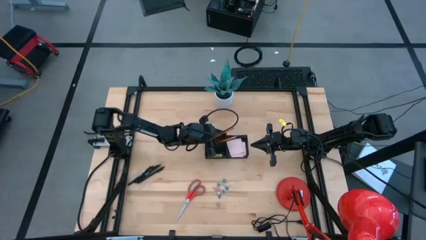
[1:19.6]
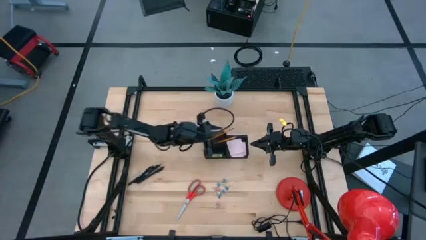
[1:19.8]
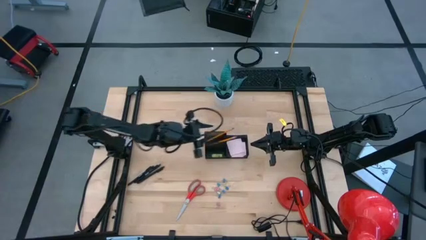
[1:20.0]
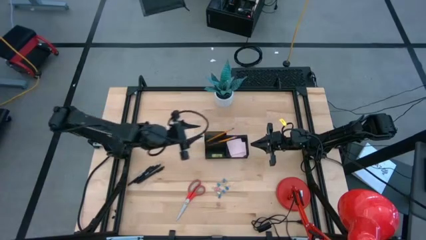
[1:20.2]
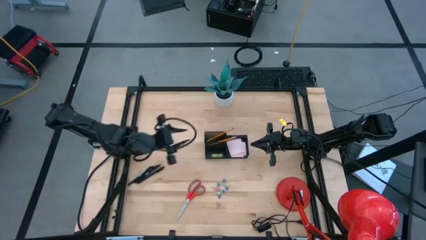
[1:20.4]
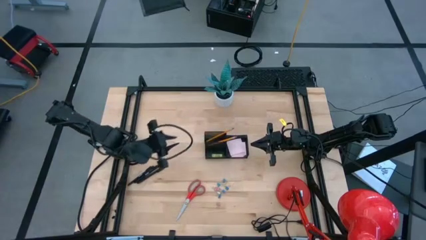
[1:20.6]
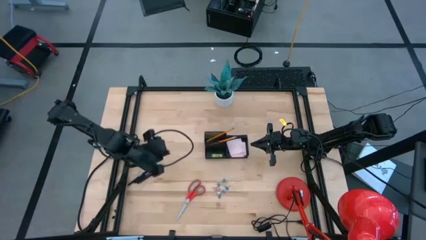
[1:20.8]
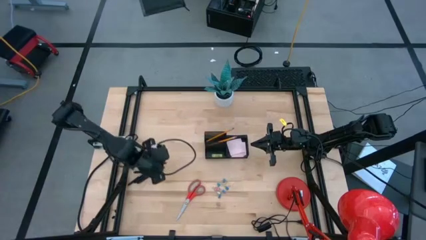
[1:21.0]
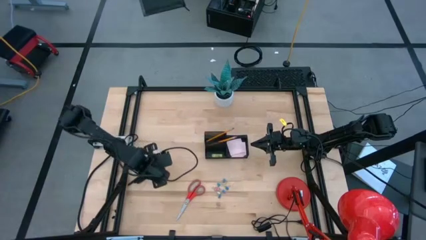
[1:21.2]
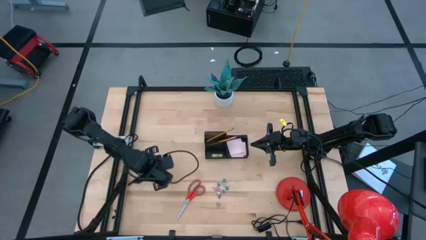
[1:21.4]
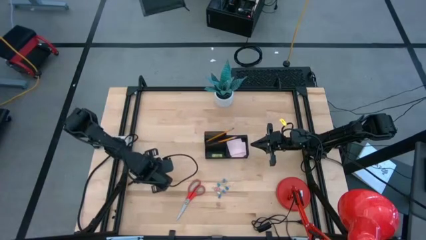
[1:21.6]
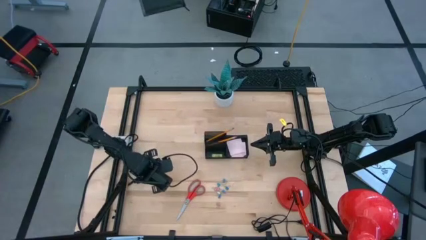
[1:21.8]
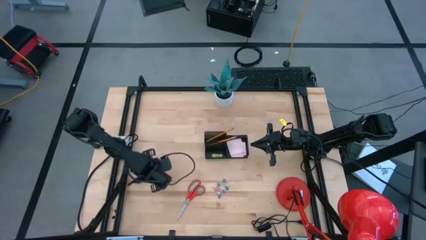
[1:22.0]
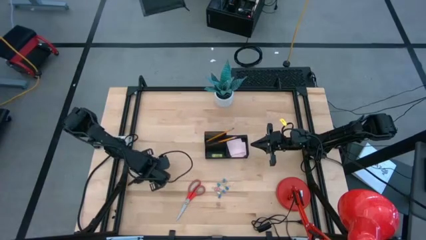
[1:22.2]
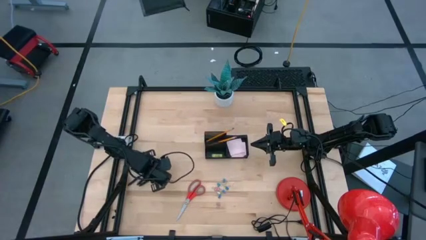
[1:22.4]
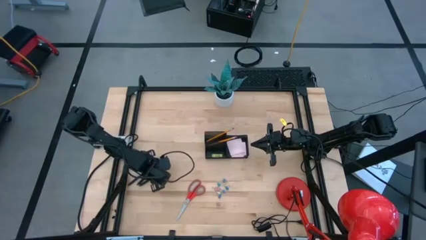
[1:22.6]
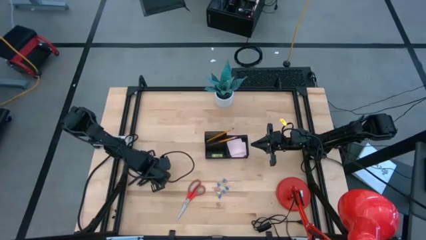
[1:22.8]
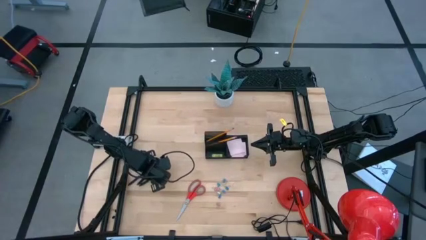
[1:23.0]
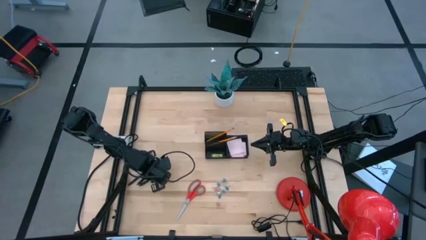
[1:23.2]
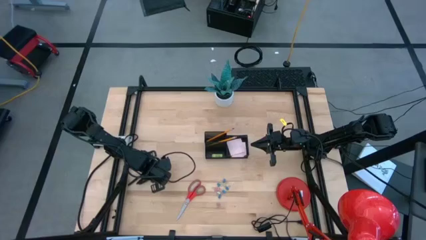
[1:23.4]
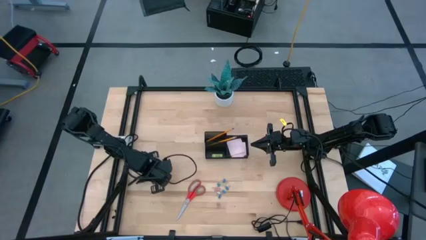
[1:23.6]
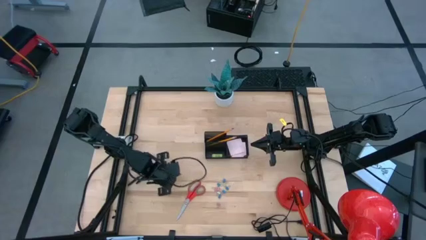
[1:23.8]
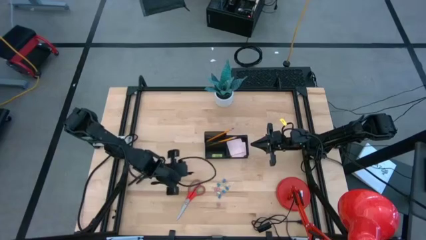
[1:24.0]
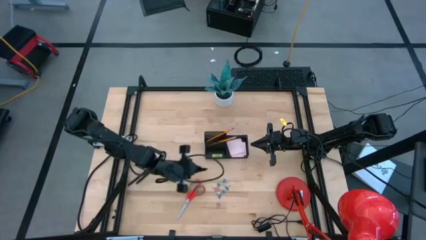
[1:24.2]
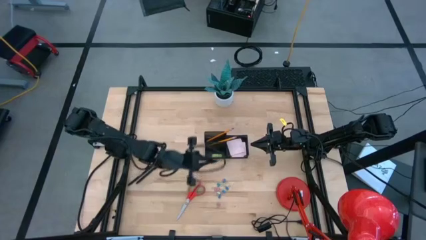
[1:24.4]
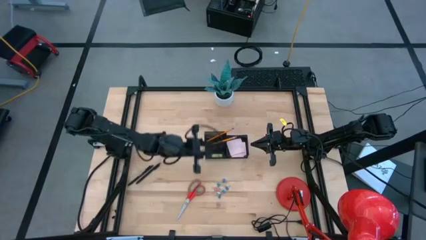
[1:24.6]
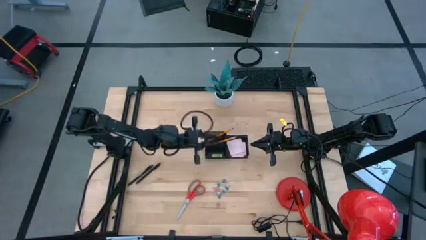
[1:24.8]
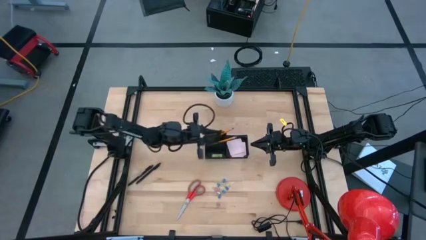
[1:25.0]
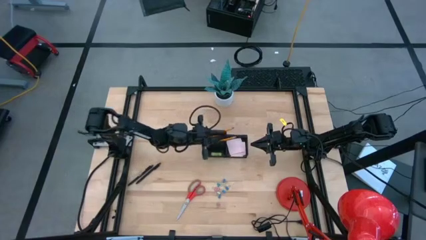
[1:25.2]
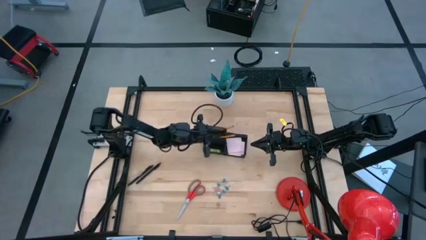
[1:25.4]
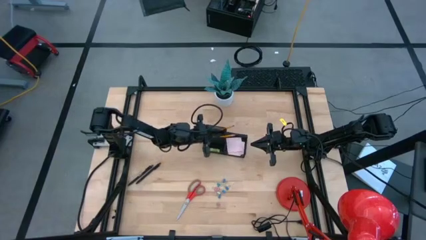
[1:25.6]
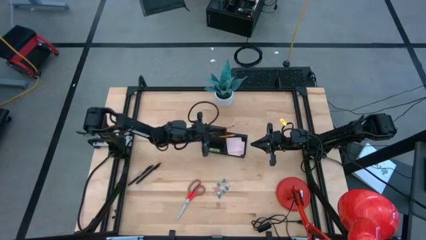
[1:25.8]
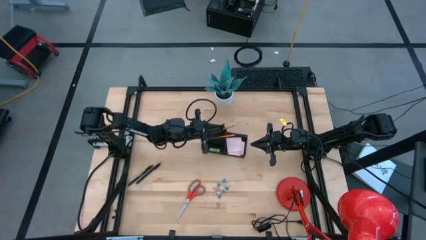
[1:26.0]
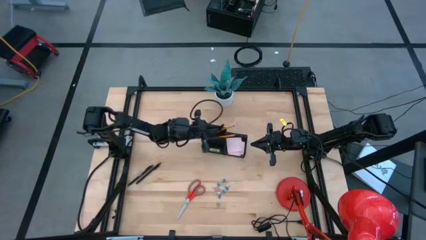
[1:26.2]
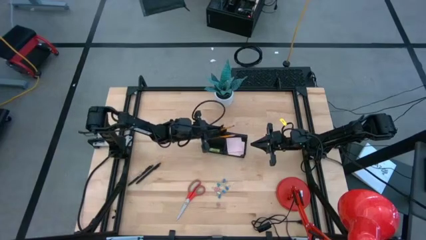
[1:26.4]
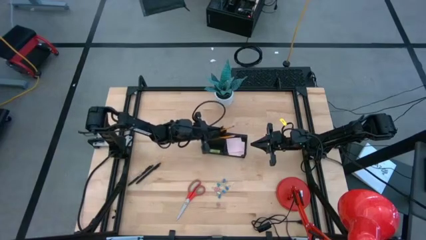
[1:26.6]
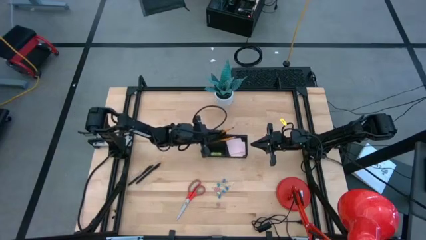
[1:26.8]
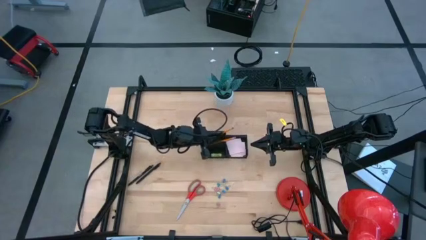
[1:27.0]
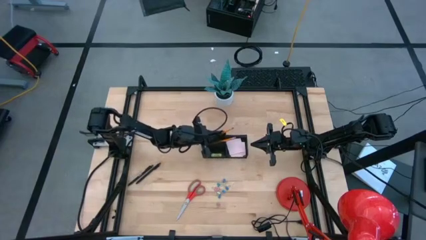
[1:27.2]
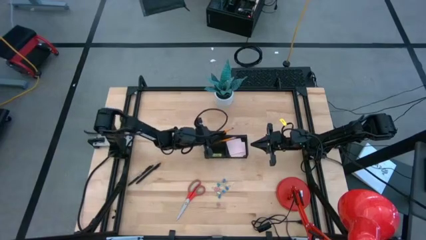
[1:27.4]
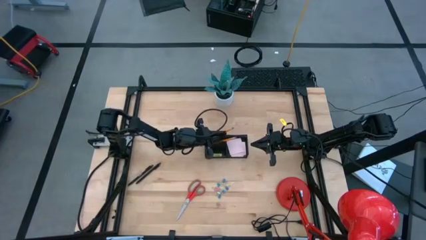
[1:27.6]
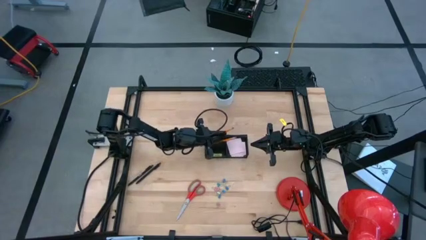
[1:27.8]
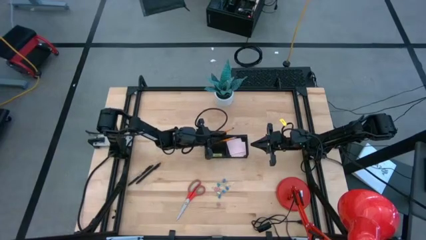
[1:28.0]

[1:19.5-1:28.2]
Task: Pick and place office supplies into organizer
Put the black pen into the desk organizer

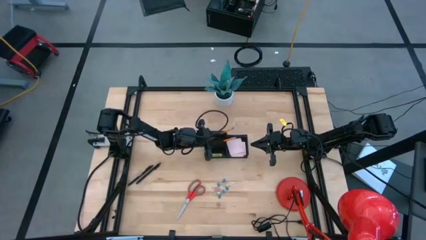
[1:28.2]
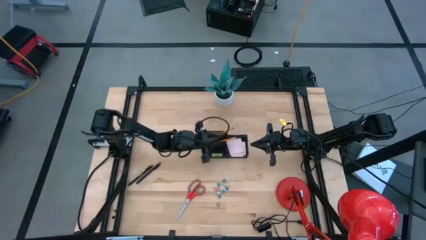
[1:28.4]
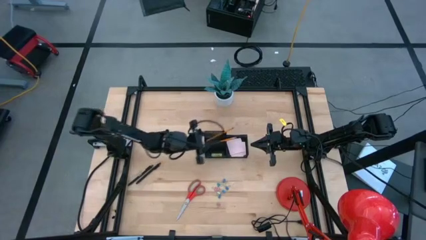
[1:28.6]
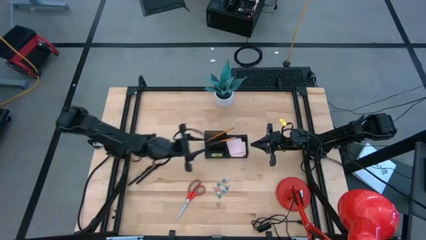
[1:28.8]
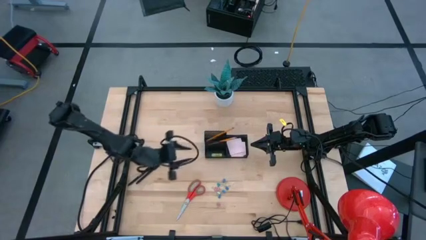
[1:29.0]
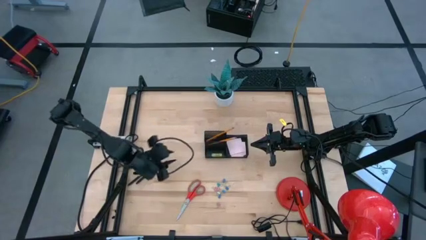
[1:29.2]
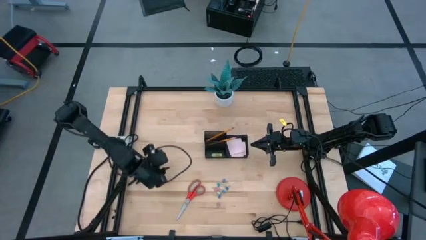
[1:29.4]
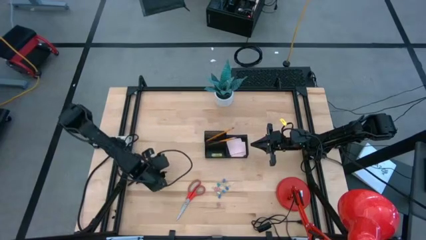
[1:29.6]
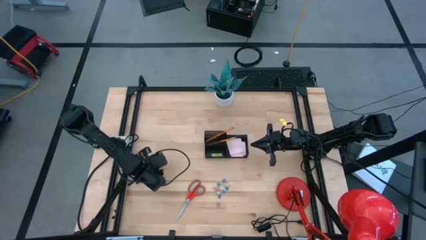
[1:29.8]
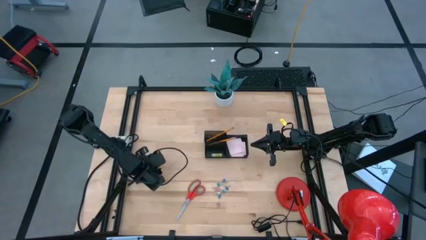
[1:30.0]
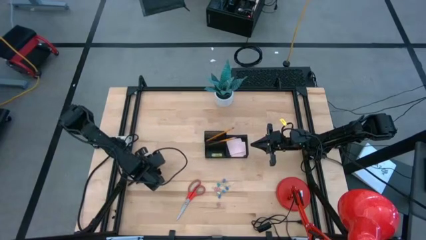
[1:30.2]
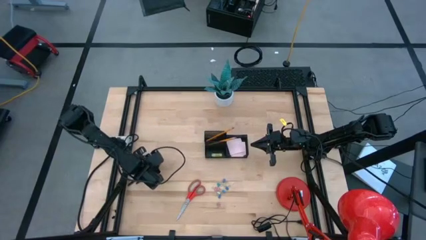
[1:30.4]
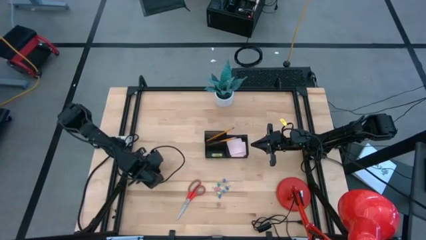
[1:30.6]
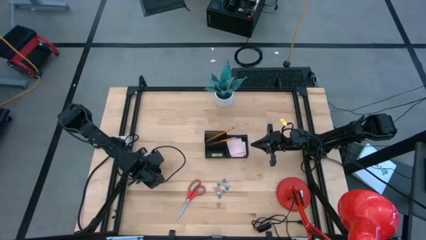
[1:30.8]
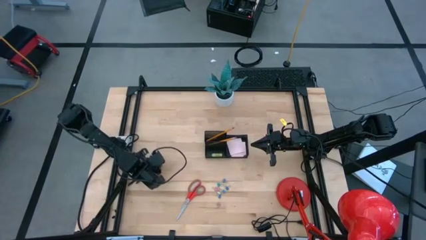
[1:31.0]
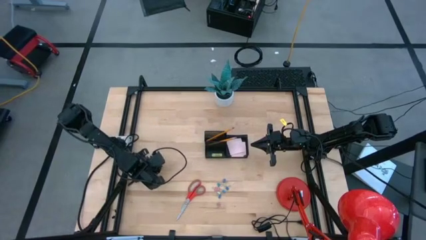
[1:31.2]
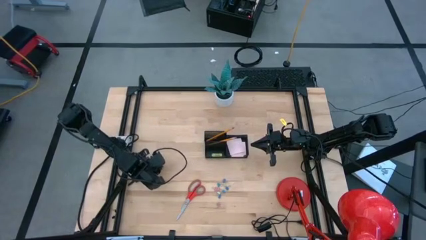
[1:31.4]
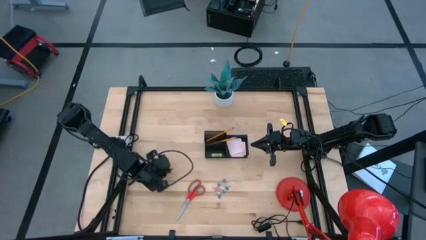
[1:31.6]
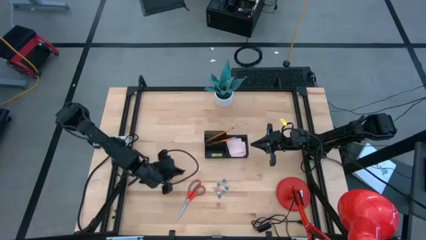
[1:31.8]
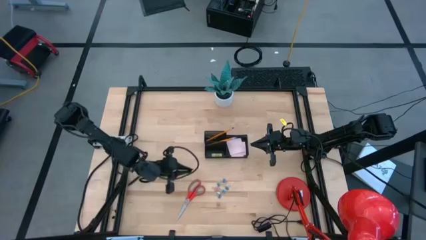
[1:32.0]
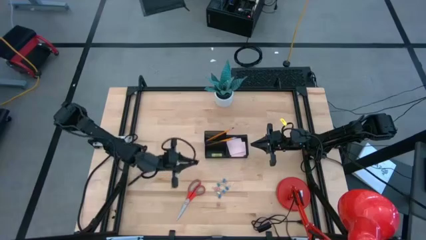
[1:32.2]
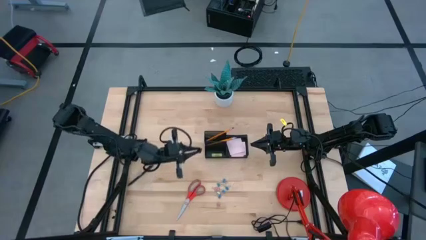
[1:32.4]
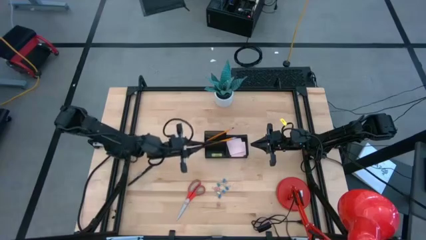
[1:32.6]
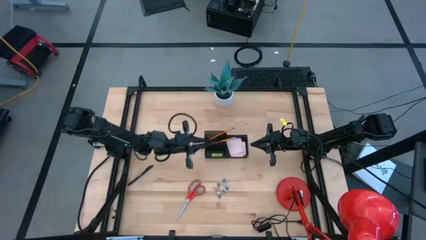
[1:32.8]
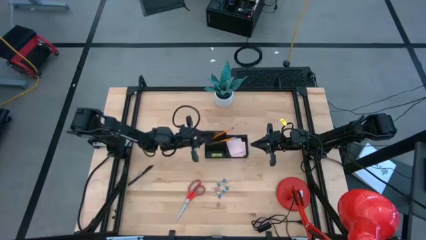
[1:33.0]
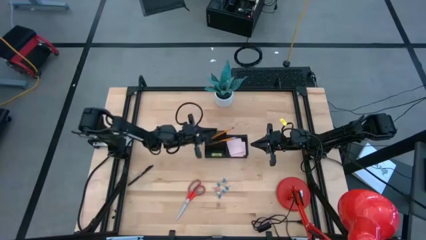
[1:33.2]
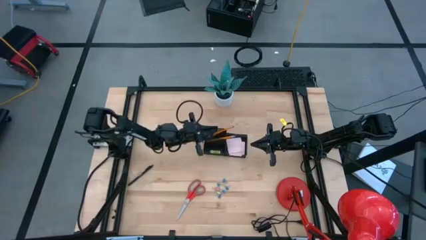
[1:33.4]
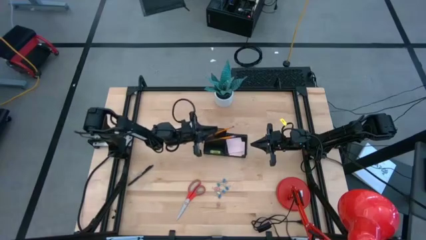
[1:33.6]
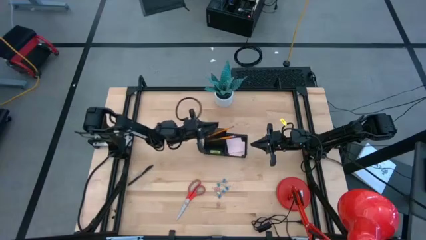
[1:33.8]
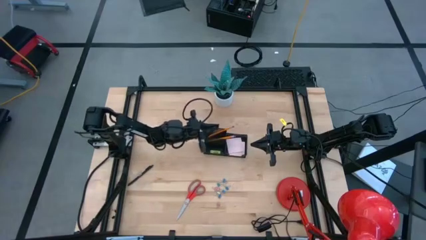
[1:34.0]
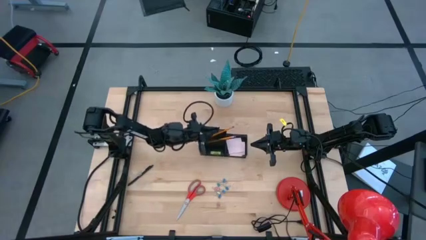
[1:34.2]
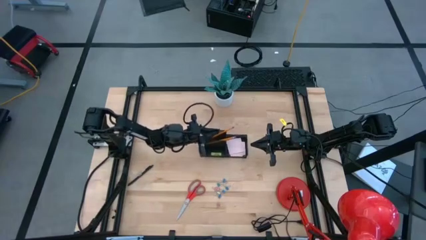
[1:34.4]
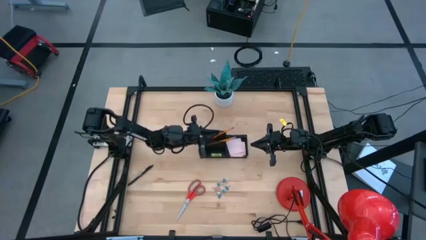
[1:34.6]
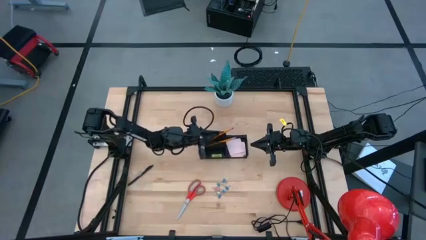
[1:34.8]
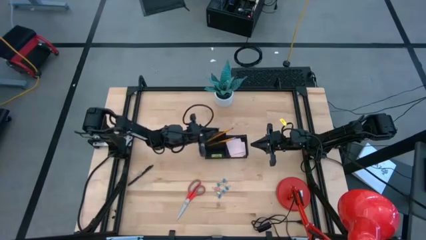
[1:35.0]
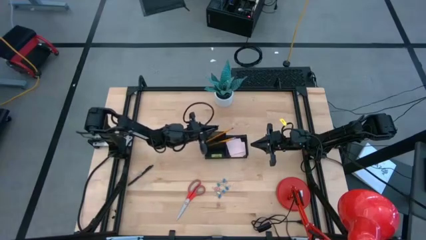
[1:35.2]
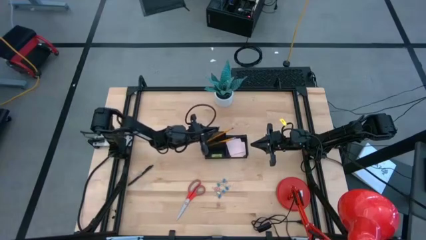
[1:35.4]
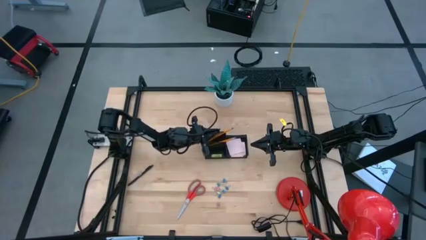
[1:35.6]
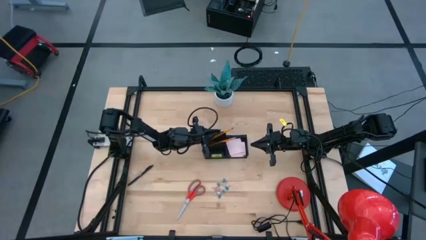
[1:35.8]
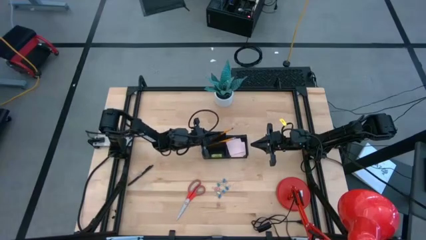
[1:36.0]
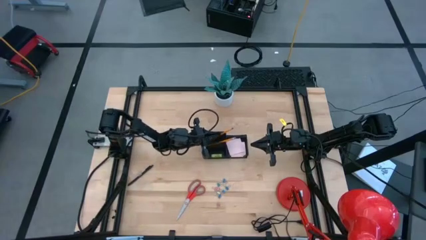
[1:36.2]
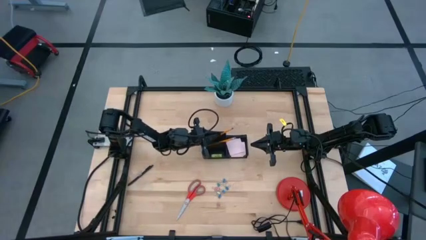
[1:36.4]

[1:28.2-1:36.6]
Put the black pen into the desk organizer
